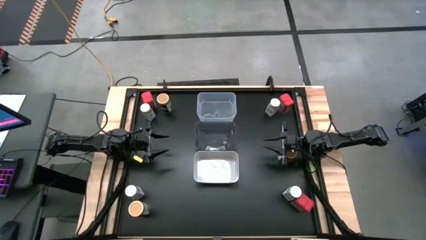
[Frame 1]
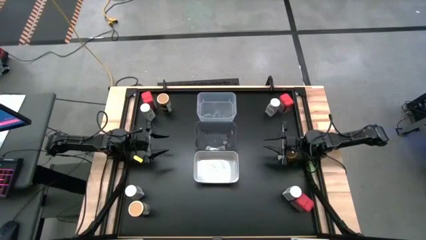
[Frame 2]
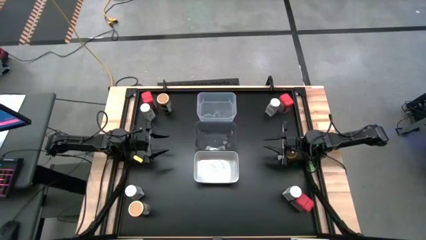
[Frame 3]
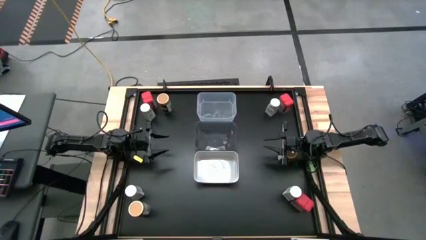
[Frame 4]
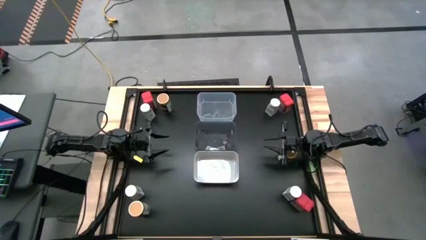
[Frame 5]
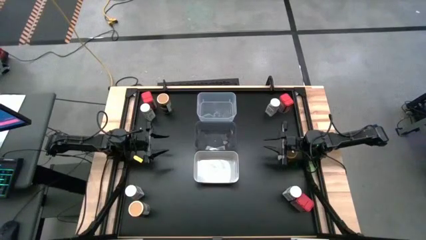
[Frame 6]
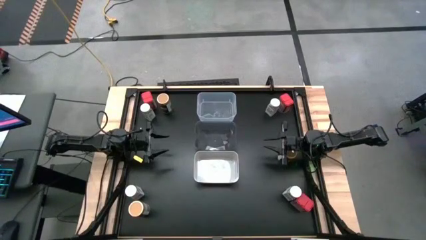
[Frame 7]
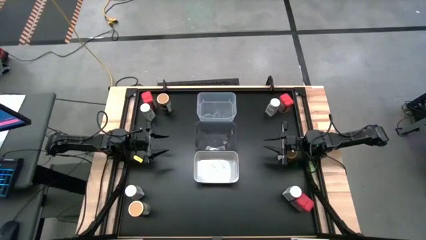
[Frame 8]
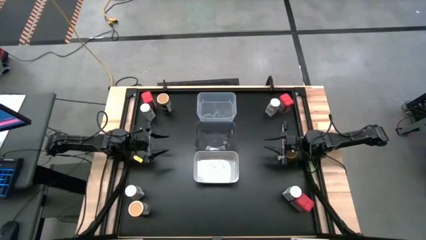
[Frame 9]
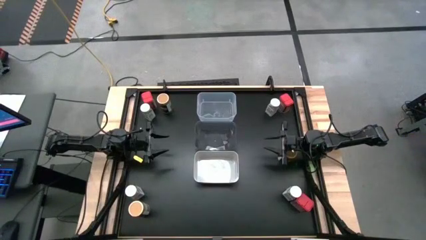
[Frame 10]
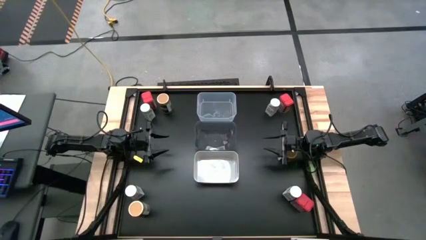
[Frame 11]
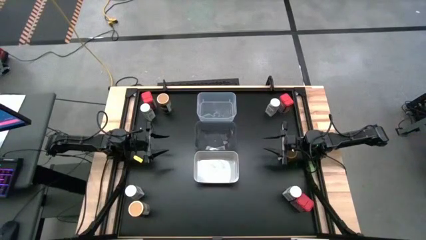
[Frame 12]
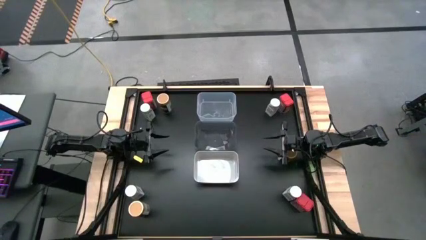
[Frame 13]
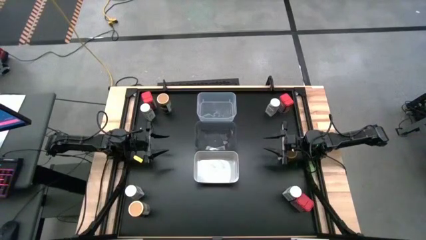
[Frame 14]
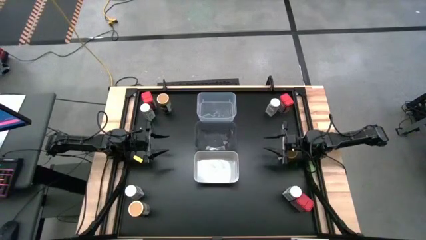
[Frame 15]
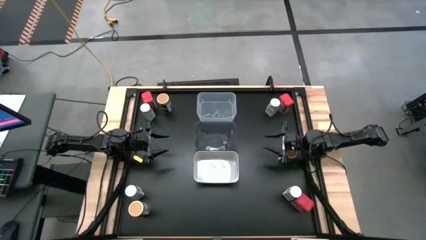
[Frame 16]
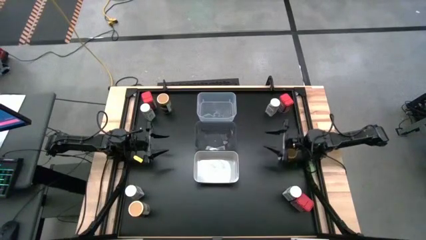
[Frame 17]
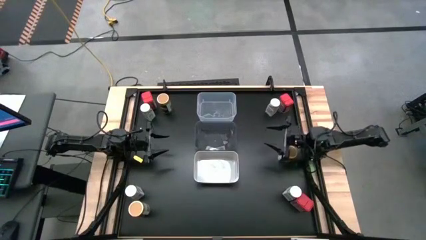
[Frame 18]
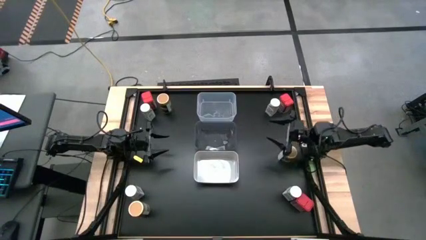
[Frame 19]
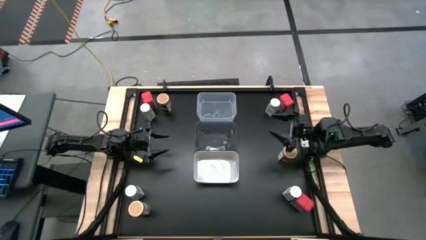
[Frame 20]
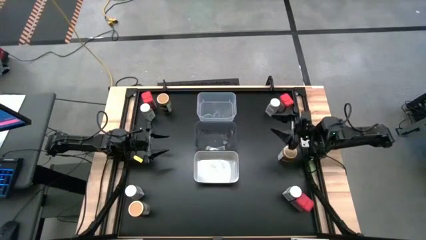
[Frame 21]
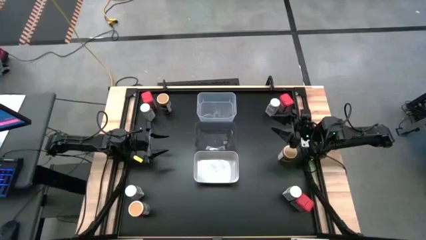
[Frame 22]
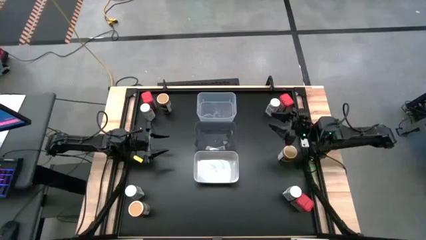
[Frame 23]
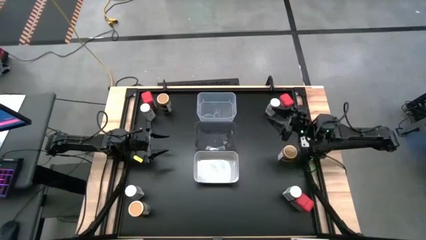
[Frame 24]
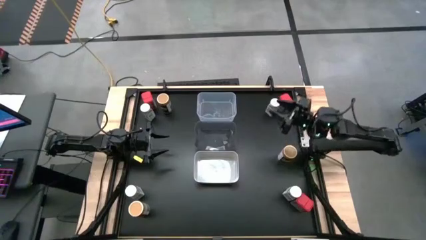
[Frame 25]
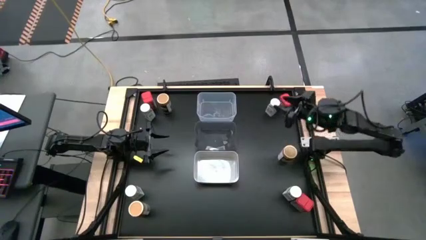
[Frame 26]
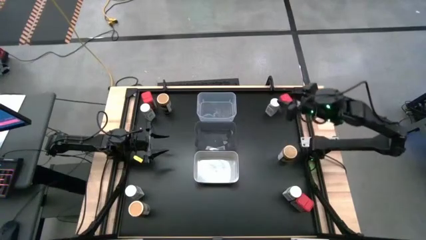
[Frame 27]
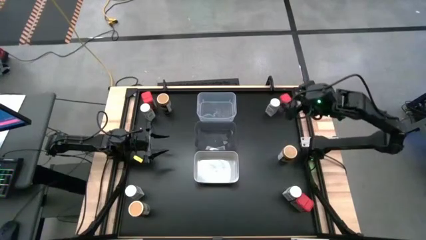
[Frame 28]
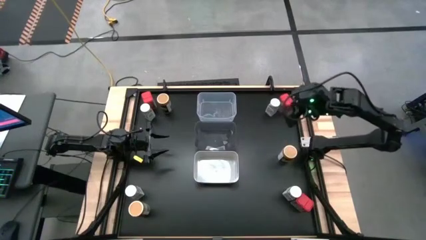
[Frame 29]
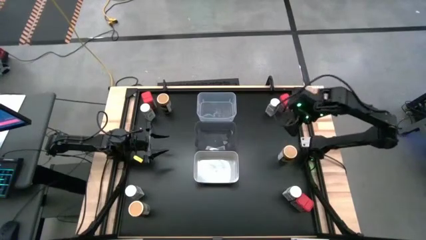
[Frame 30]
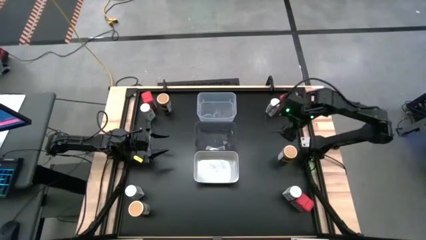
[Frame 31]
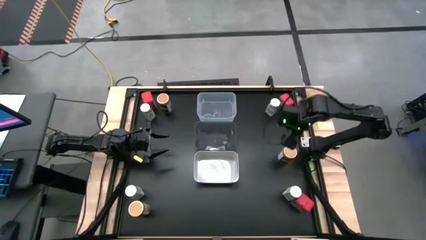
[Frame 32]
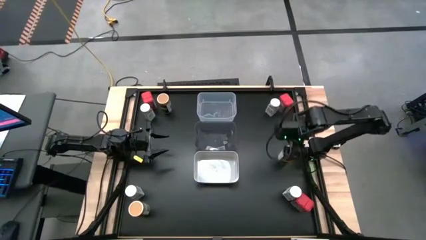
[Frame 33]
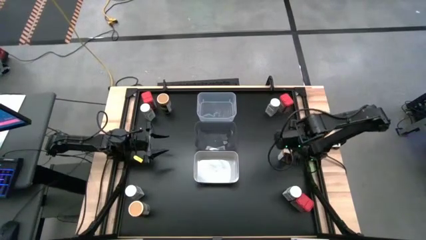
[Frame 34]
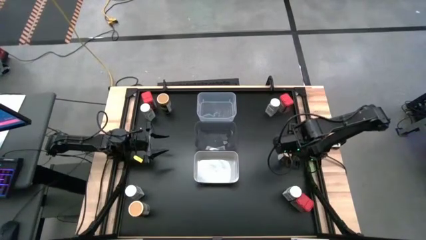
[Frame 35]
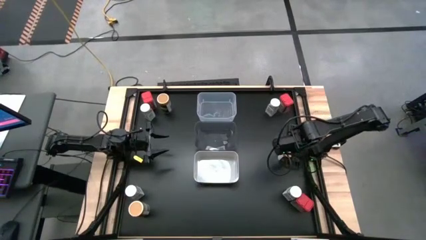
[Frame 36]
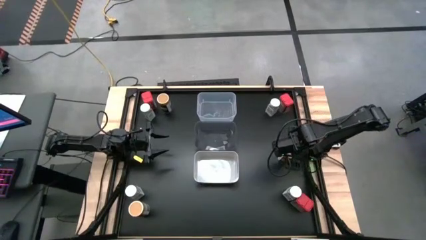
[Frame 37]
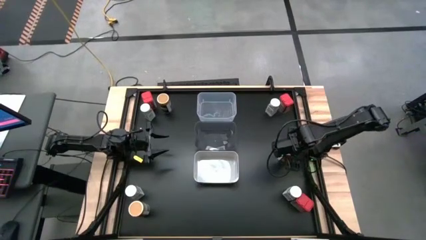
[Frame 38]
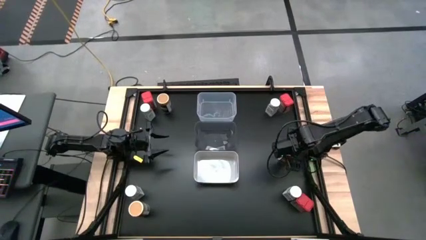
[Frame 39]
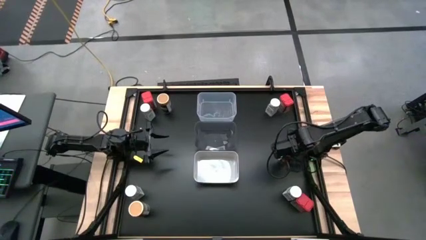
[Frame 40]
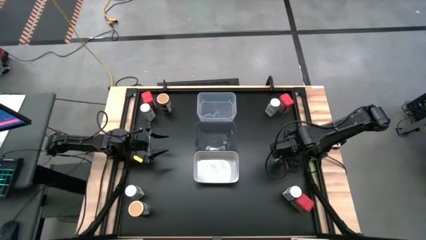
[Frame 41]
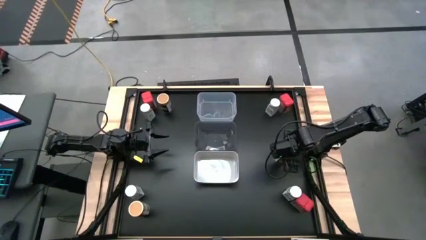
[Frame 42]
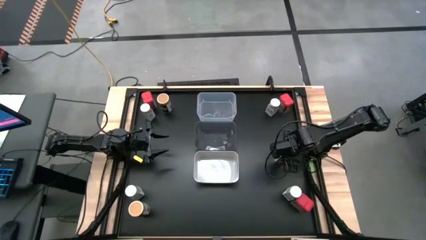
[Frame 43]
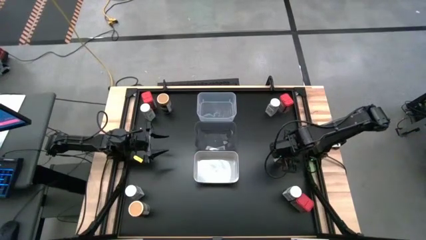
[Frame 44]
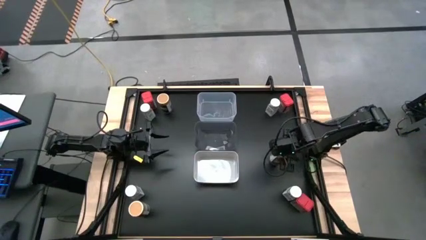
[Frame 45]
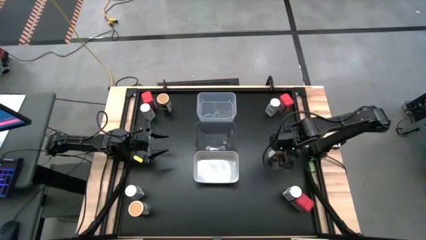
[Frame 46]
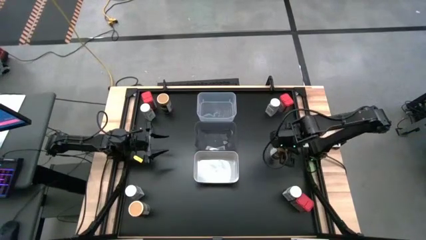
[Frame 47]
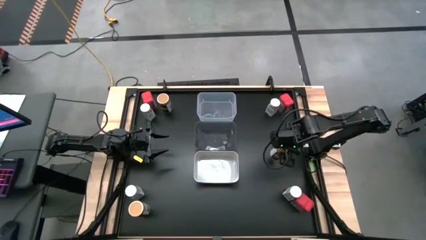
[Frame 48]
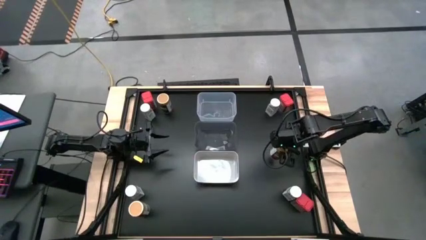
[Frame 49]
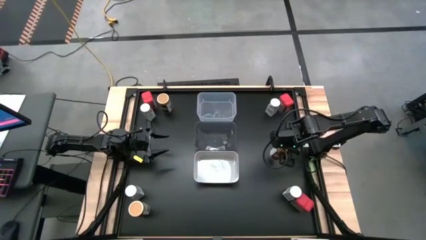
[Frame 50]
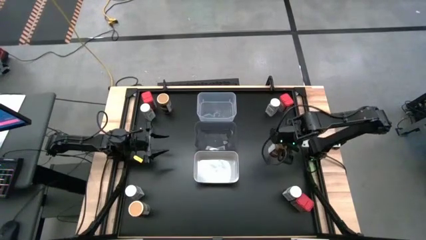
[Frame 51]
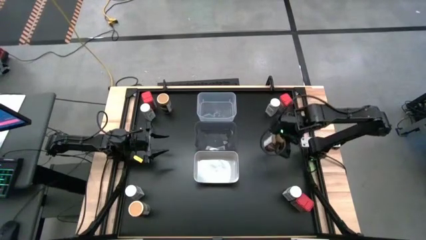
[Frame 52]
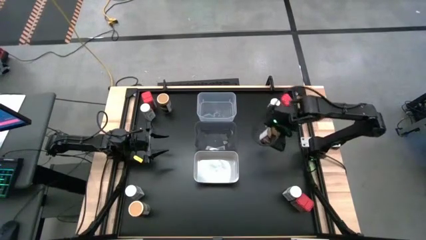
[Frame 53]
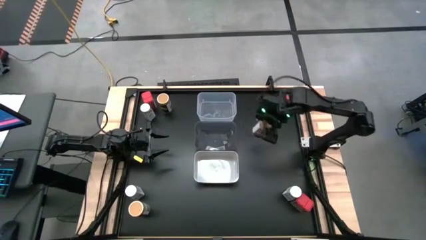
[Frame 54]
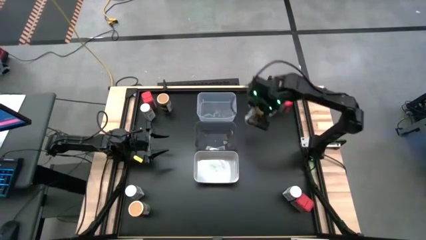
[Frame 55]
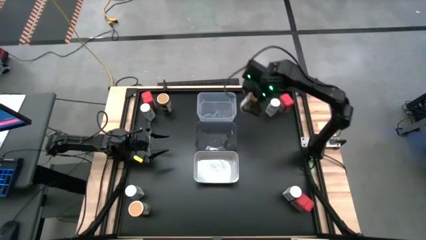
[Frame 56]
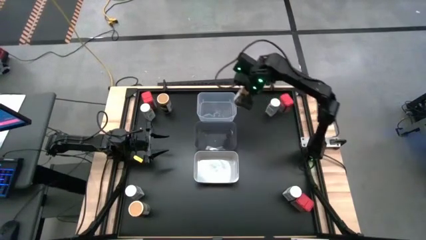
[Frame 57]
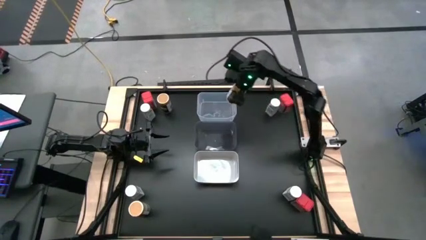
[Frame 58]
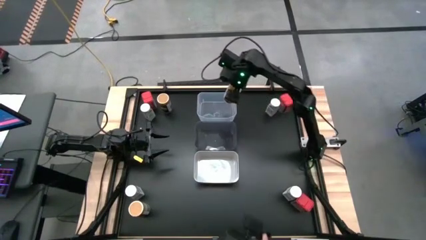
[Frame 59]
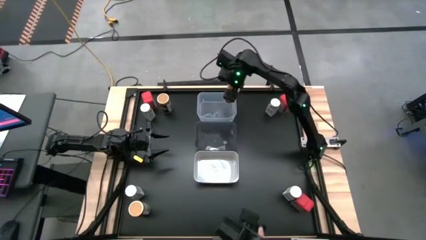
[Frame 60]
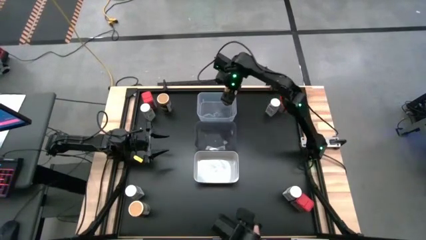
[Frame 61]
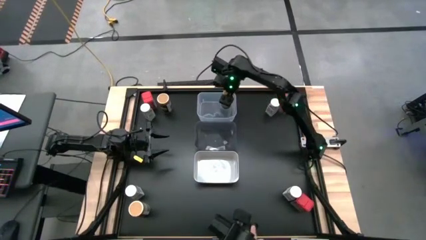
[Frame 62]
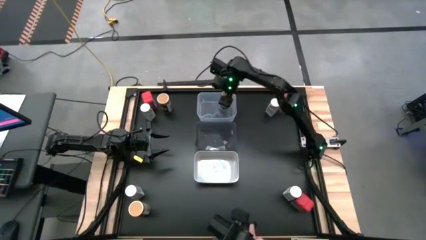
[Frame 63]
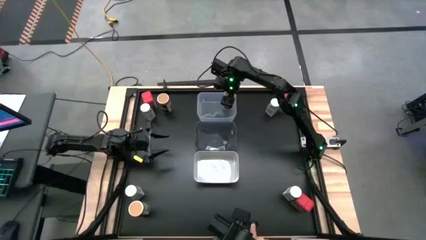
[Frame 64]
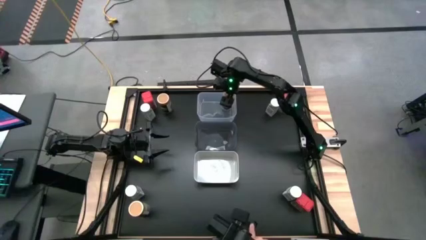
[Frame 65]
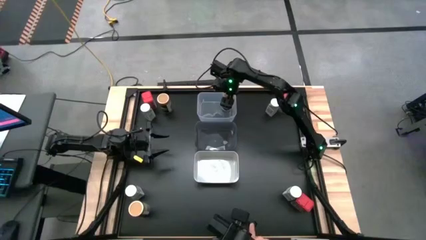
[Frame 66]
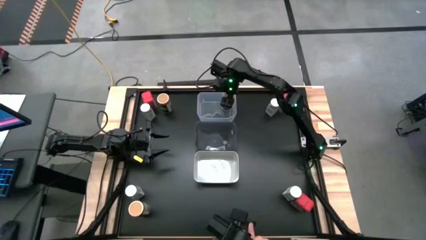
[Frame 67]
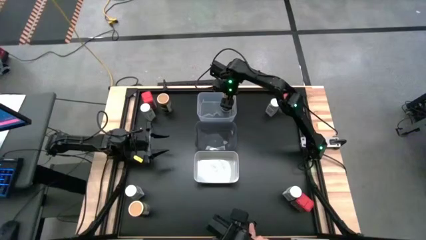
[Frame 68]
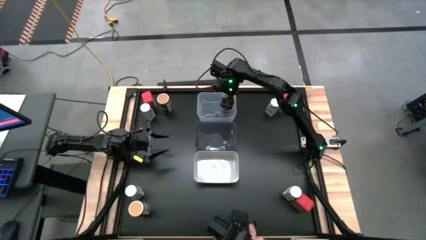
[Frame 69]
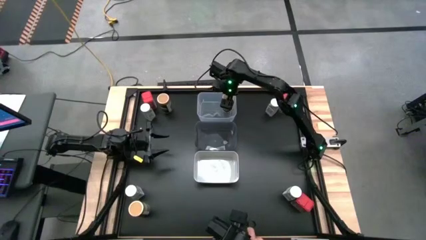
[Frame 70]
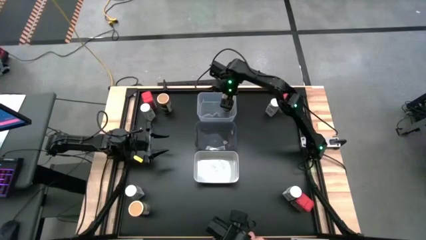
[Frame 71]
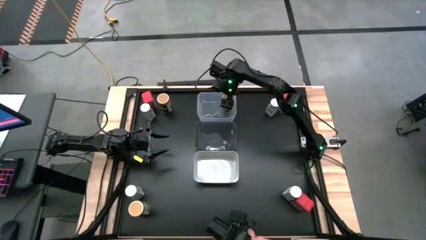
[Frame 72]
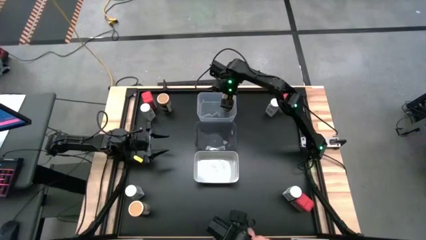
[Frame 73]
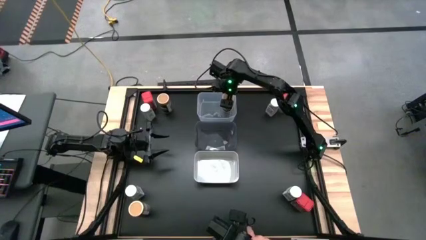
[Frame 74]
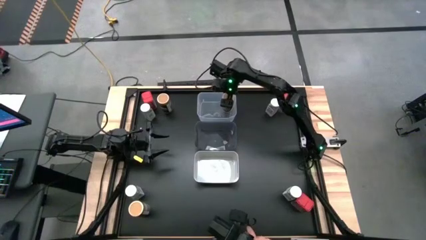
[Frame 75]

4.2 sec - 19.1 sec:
Task: Sort spices by type
Put the middle right brown seasoning bottle into the white transparent bin
